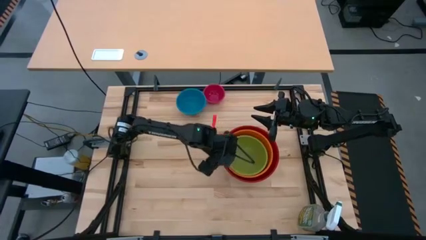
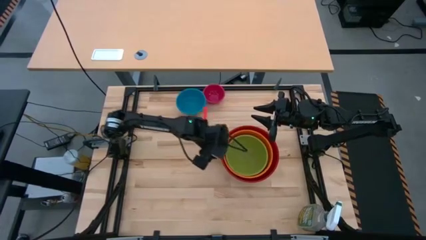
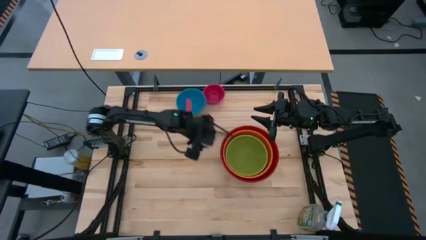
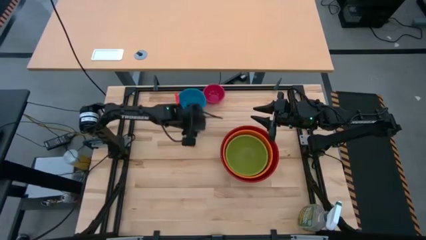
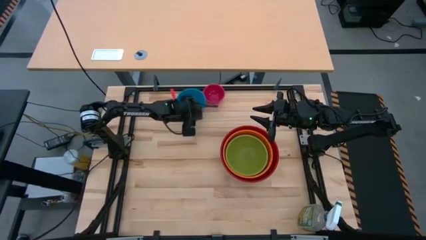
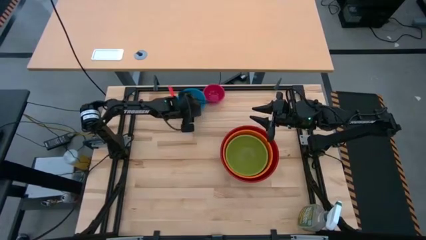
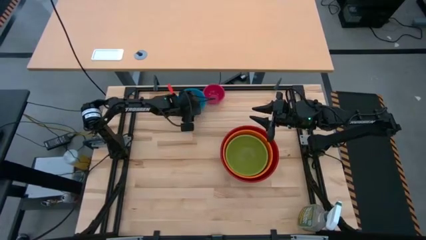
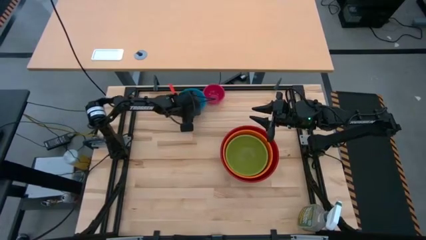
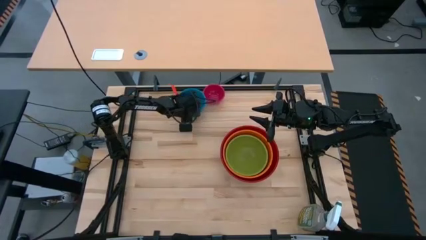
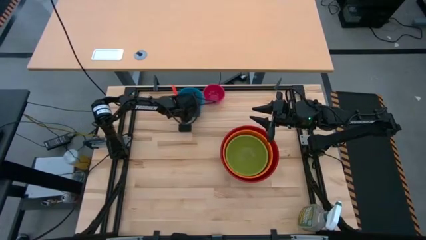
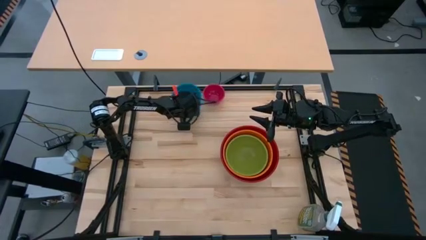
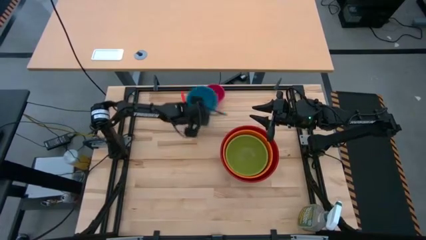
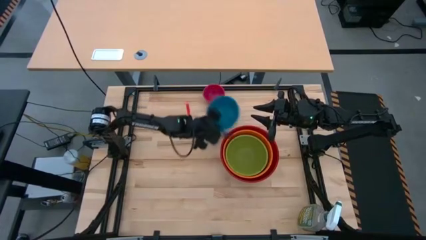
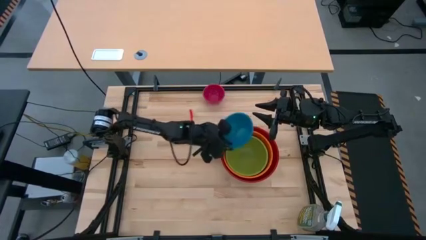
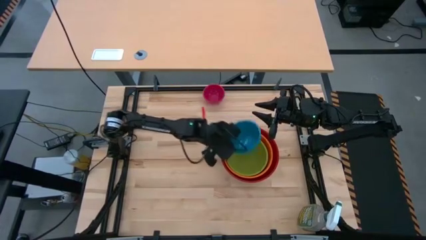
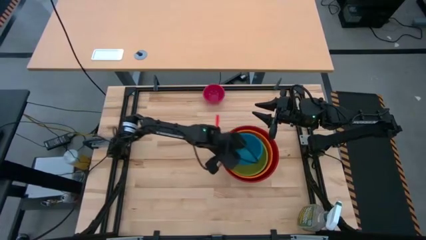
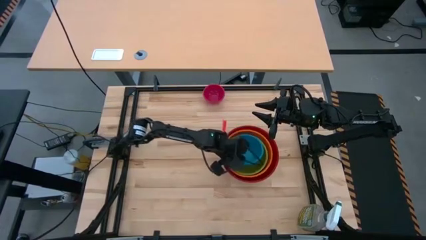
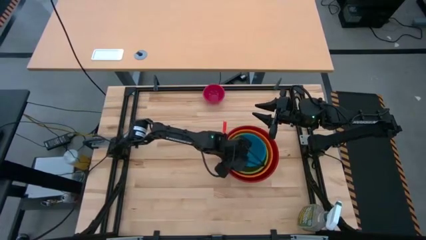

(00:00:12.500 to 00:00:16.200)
Stack the blue bowl on top of the green bowl

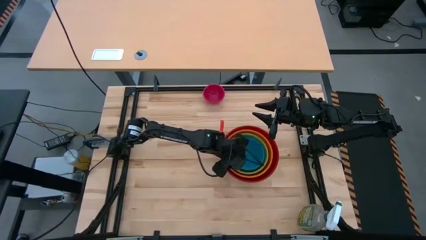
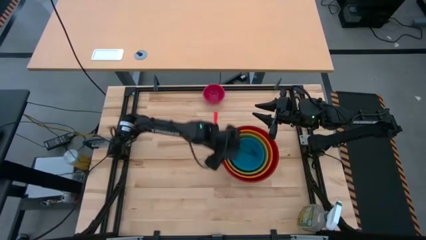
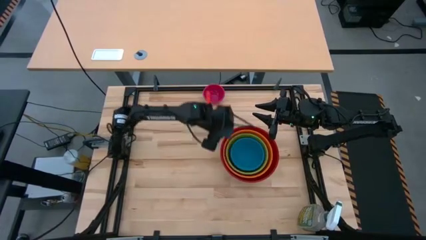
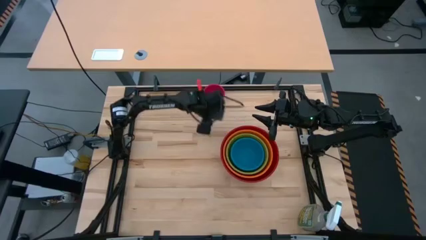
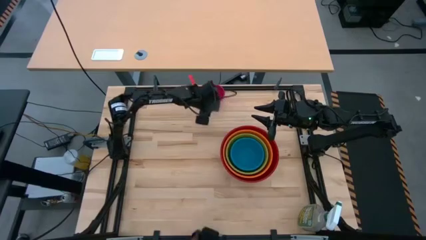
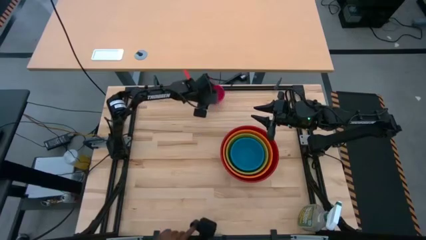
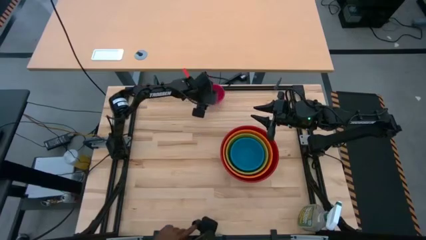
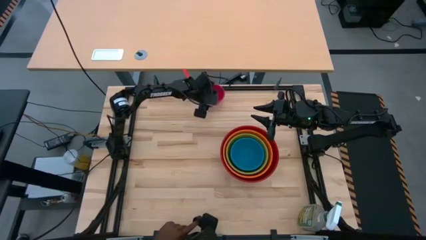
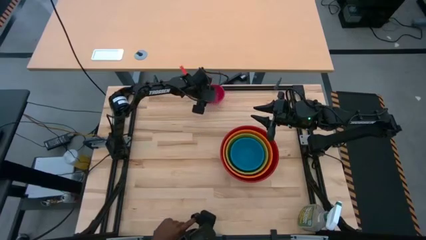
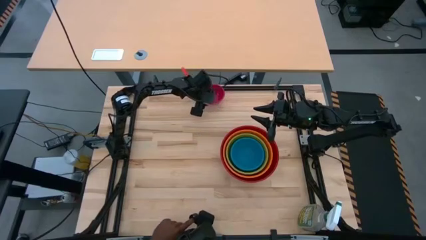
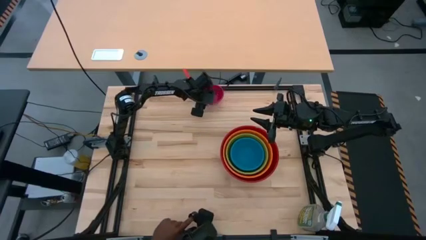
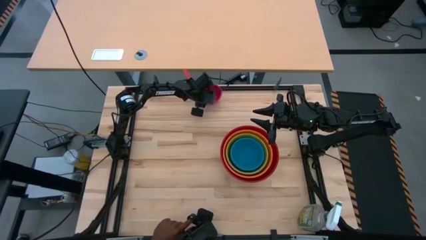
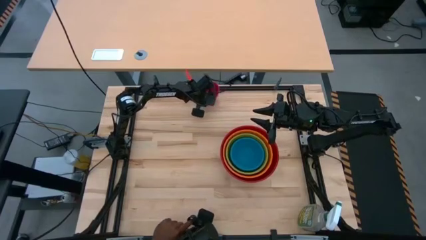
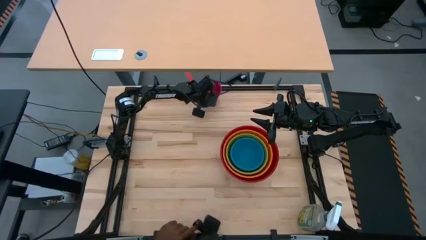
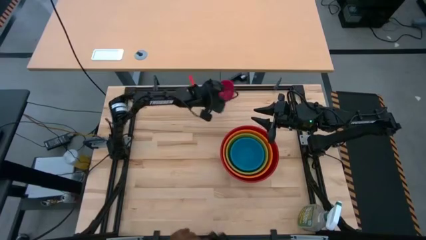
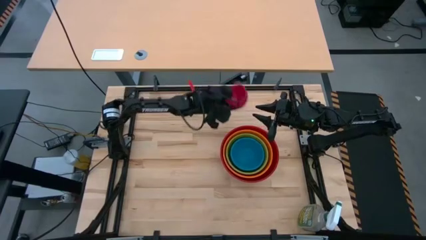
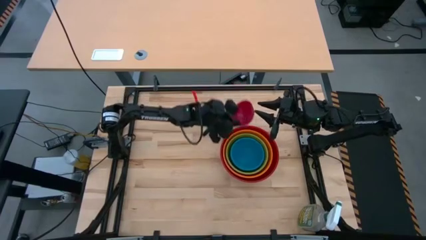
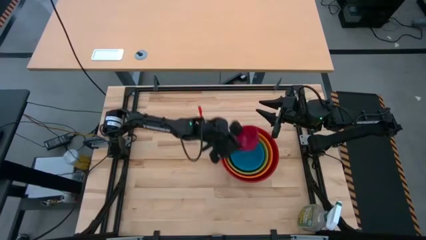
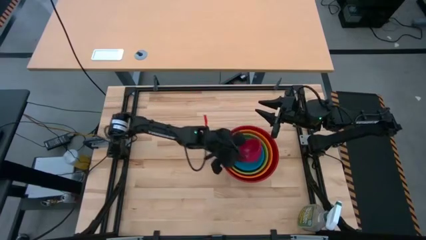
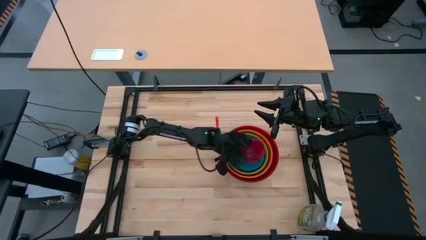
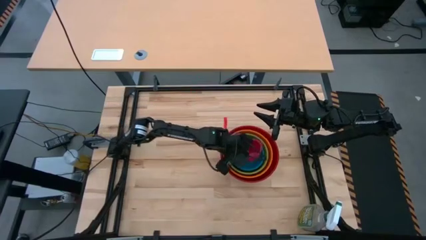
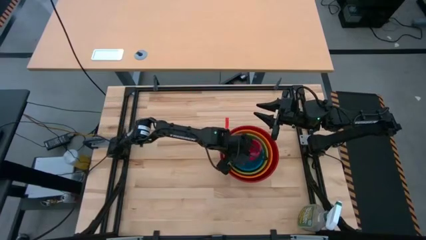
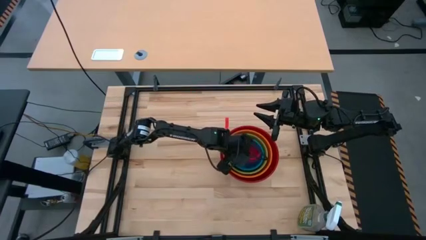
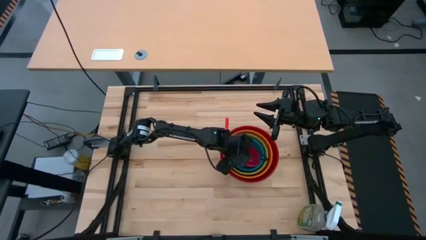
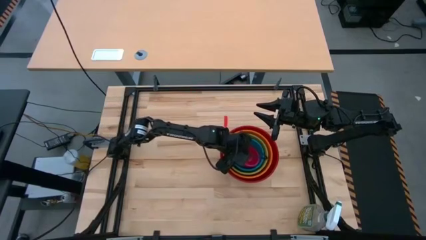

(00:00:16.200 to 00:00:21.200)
Stack the pink bowl on top of the blue bowl

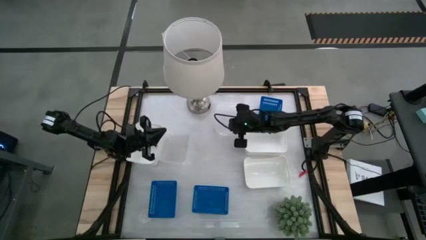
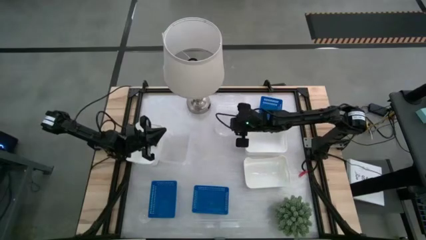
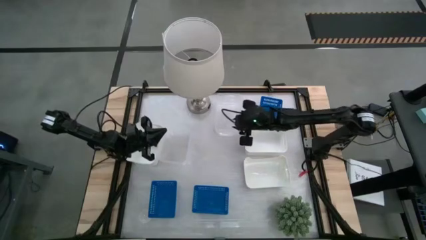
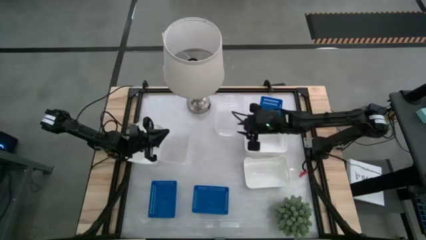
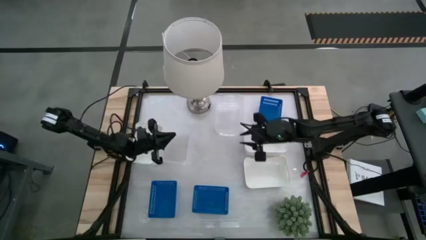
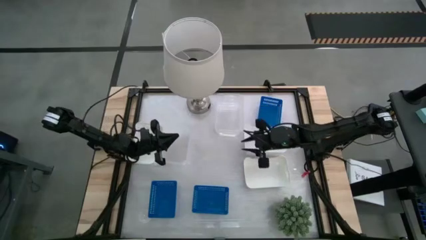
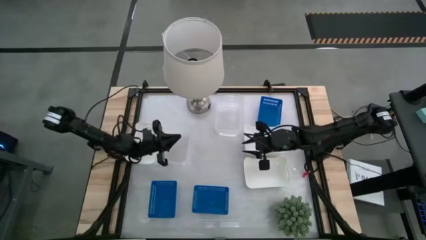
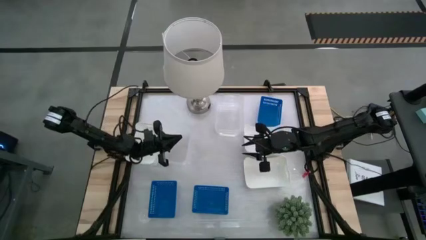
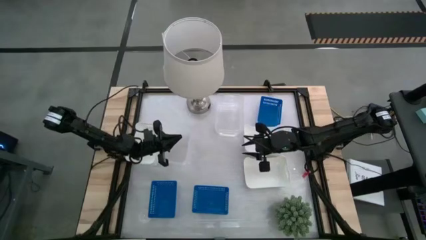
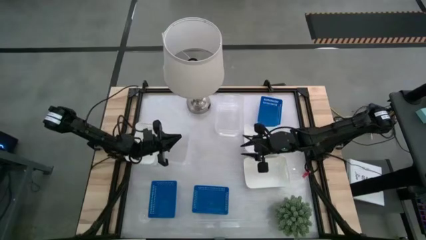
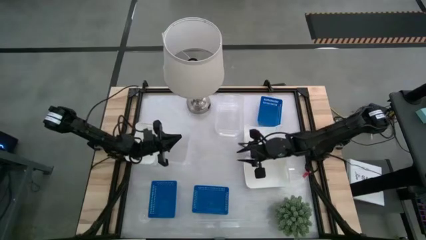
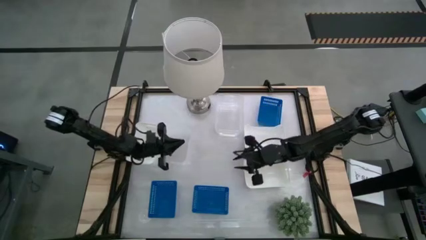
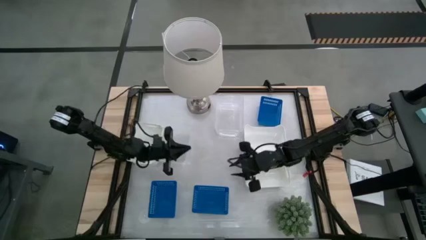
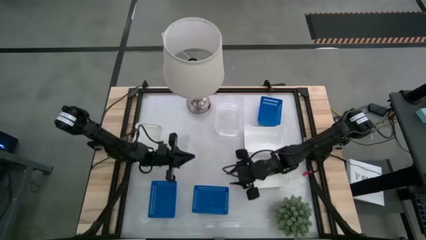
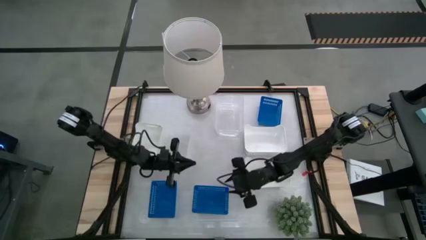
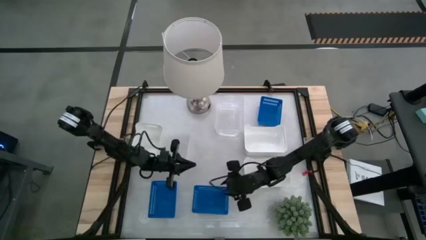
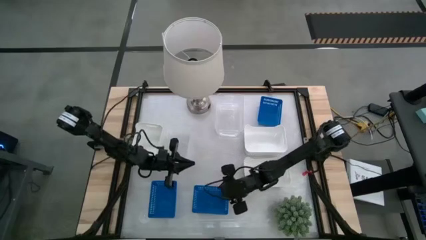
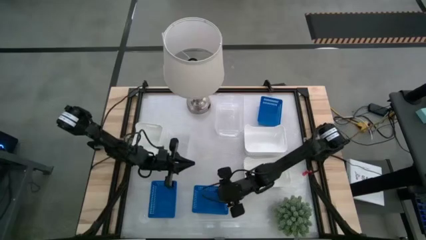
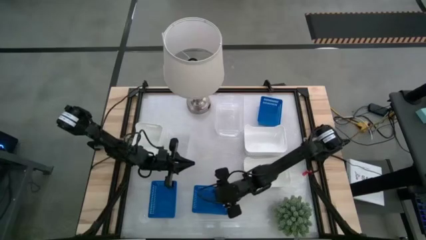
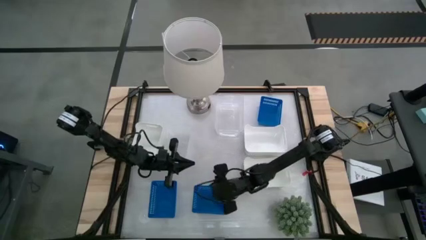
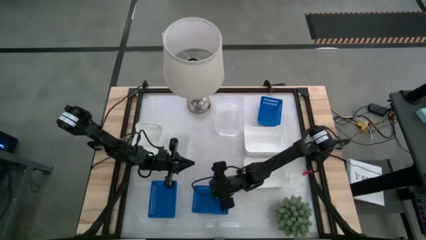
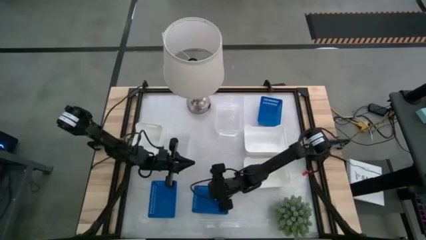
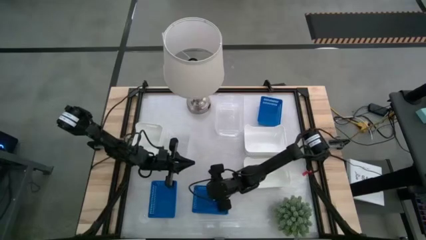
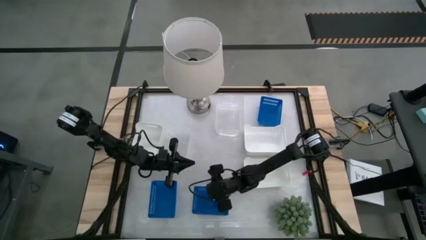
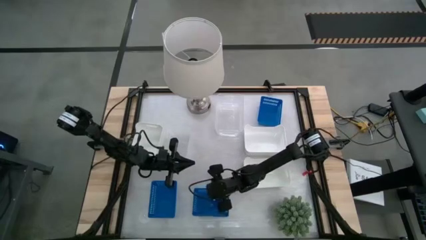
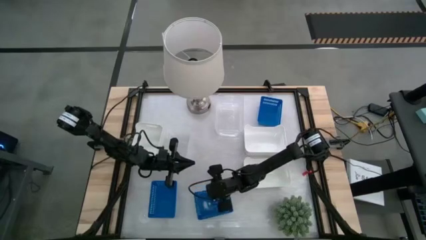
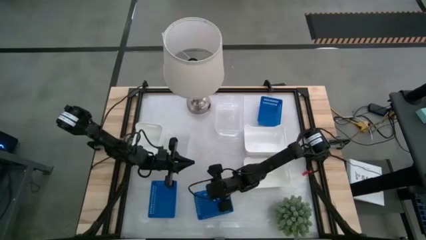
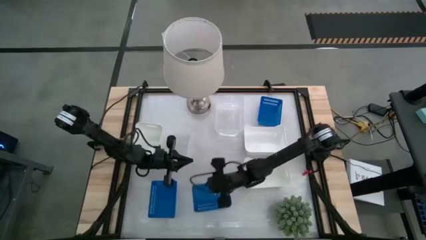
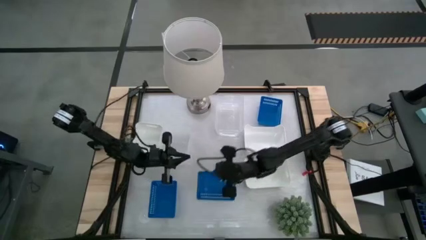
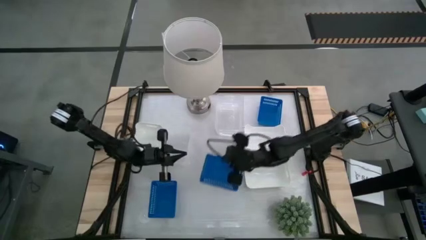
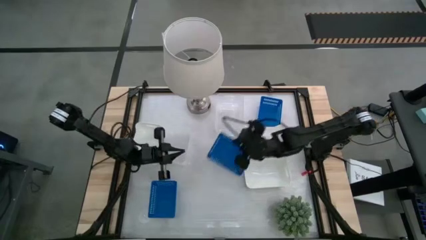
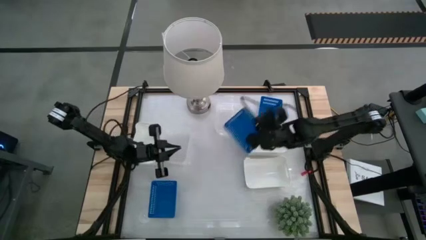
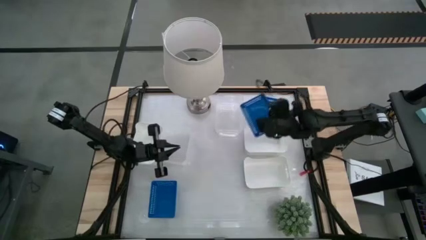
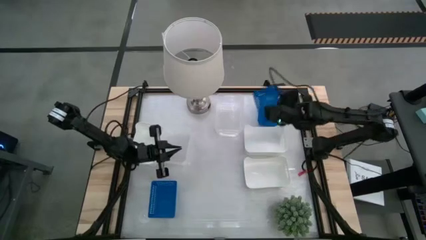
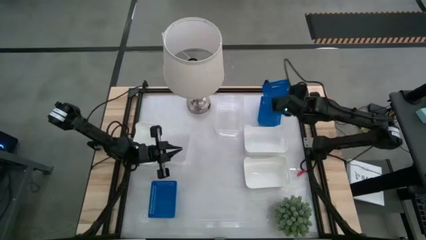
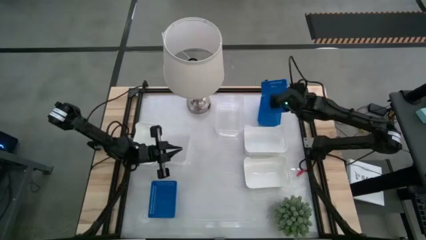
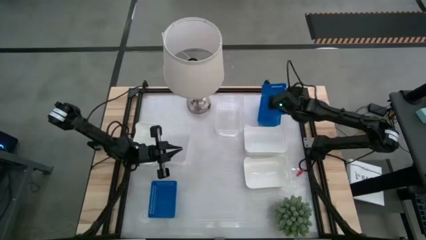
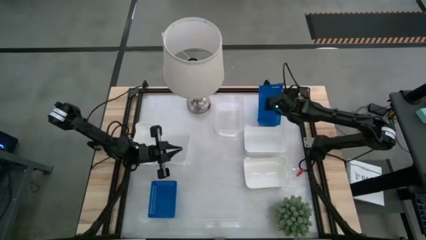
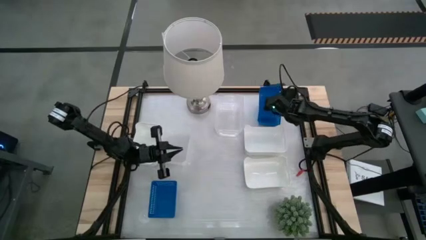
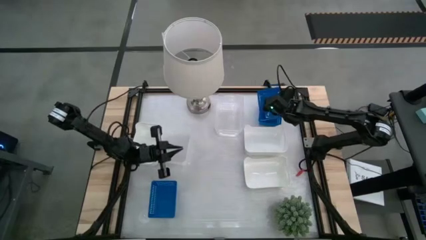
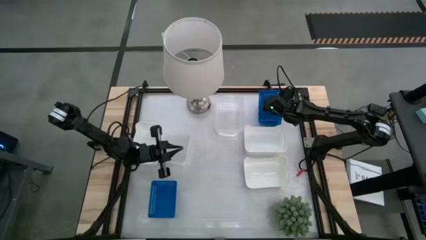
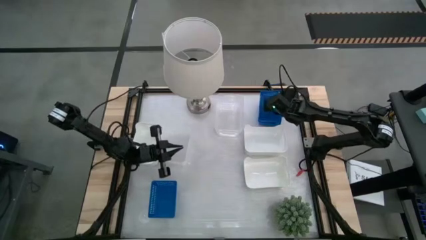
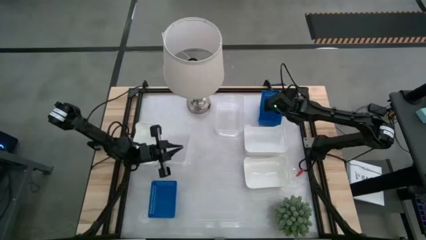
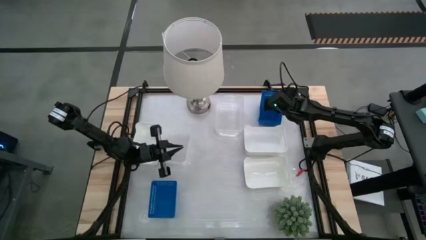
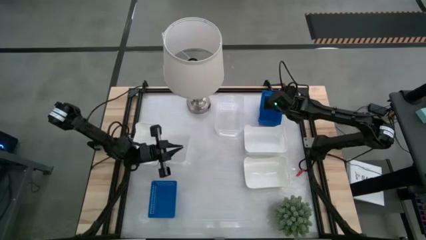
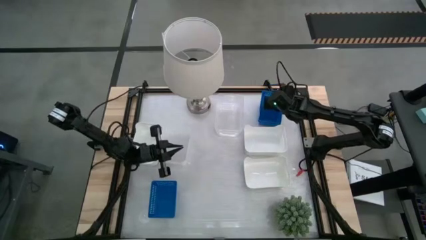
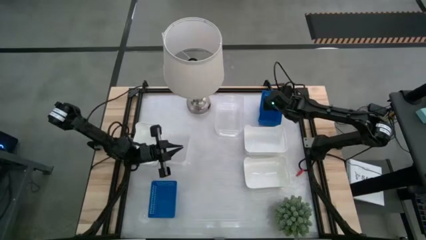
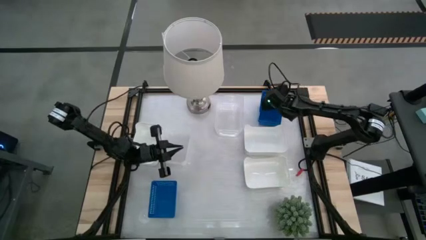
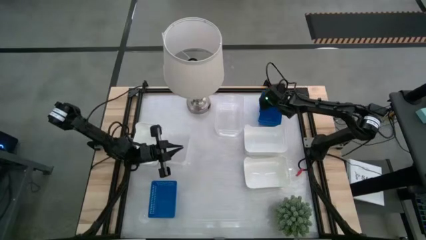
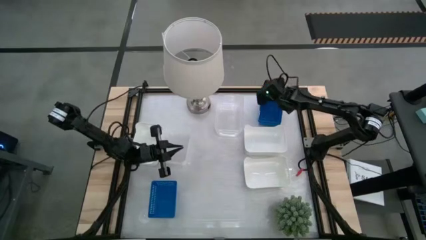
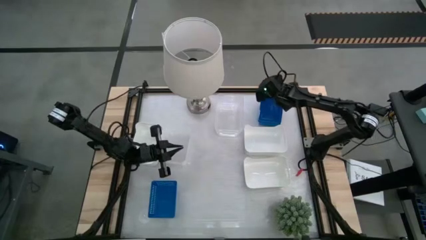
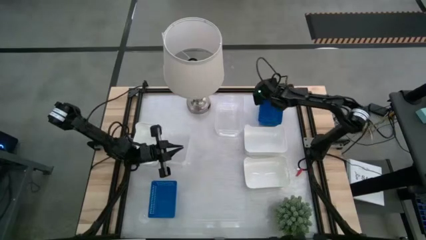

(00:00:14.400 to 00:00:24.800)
Stack the bottom right blue bin on the blue bin
